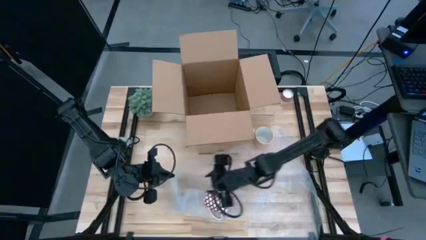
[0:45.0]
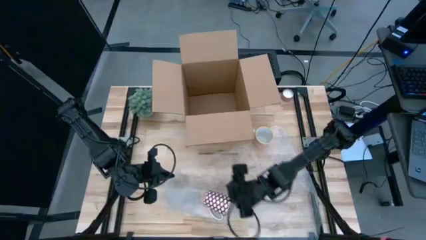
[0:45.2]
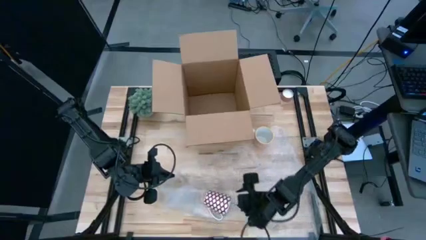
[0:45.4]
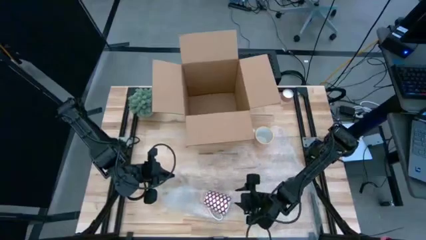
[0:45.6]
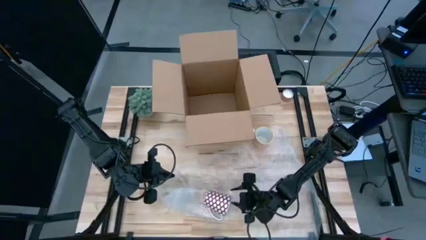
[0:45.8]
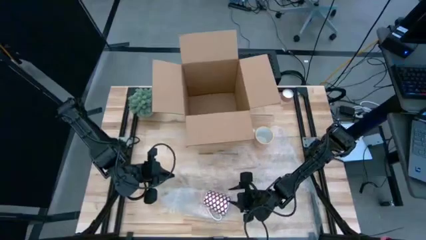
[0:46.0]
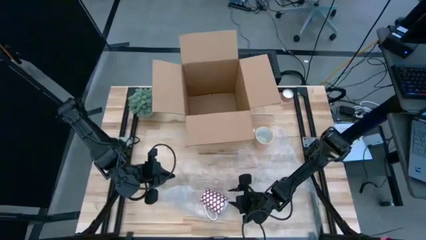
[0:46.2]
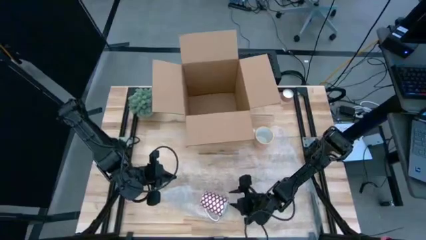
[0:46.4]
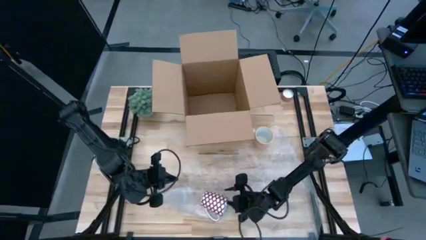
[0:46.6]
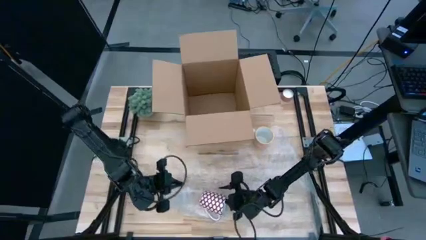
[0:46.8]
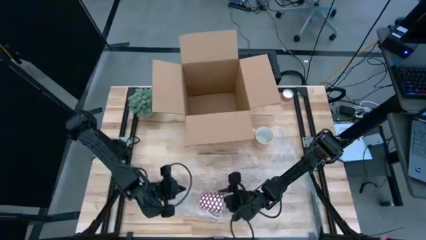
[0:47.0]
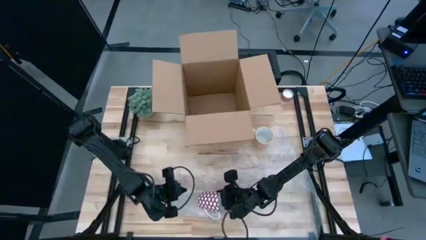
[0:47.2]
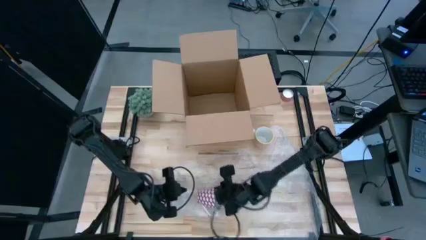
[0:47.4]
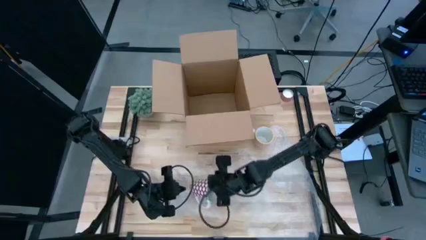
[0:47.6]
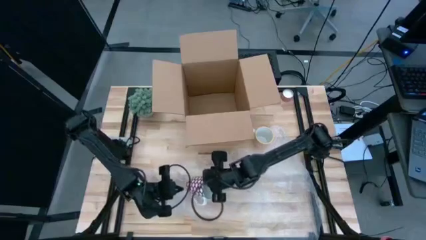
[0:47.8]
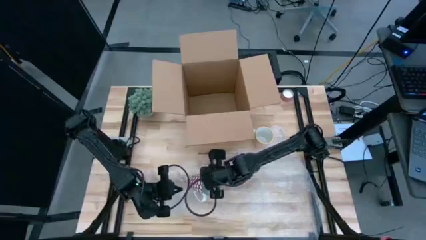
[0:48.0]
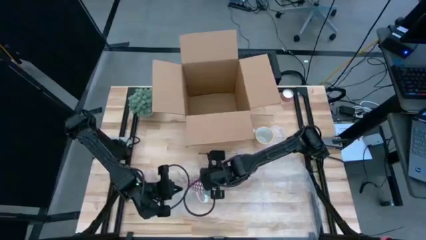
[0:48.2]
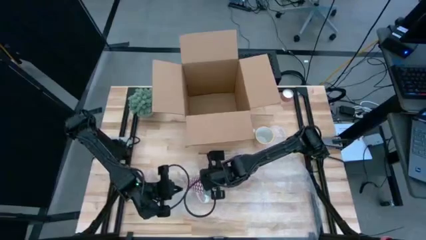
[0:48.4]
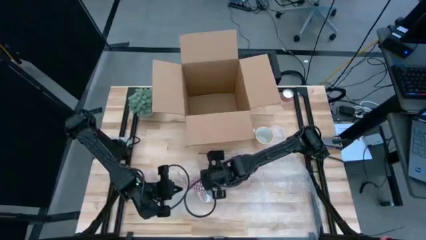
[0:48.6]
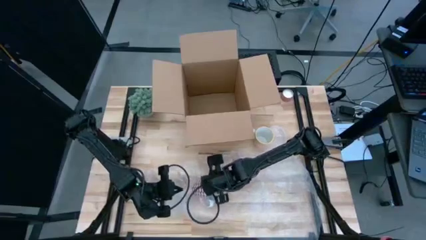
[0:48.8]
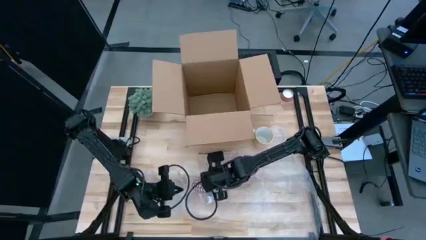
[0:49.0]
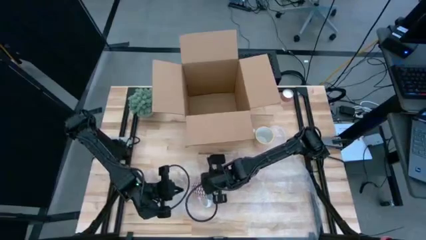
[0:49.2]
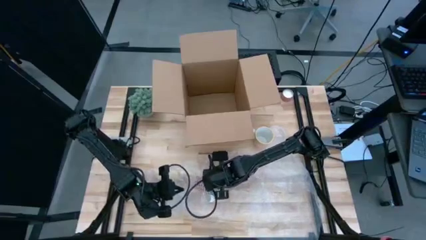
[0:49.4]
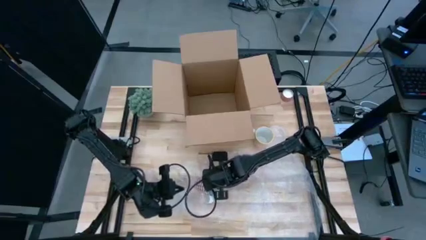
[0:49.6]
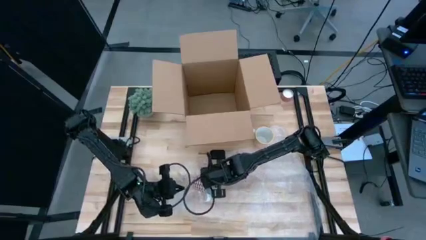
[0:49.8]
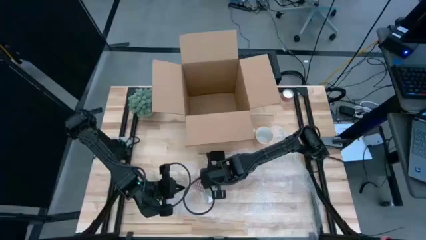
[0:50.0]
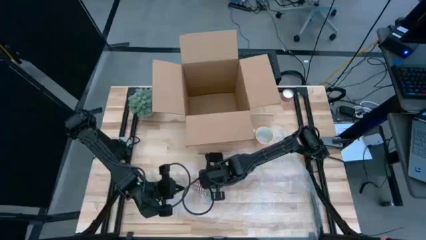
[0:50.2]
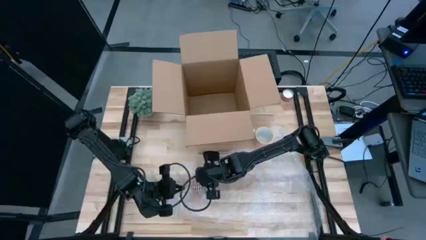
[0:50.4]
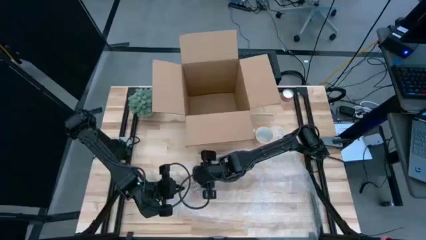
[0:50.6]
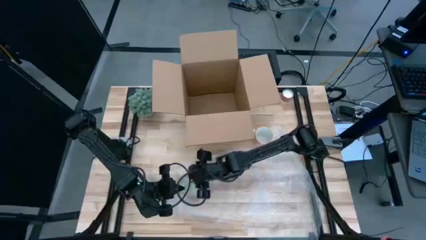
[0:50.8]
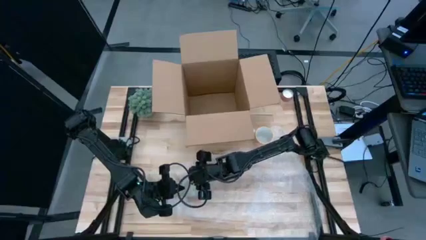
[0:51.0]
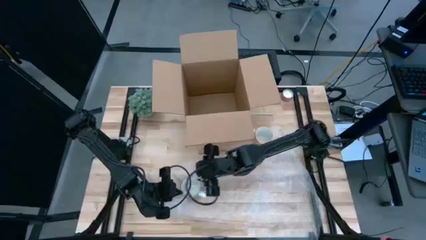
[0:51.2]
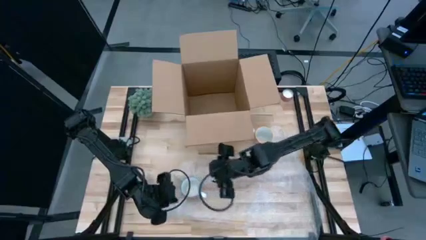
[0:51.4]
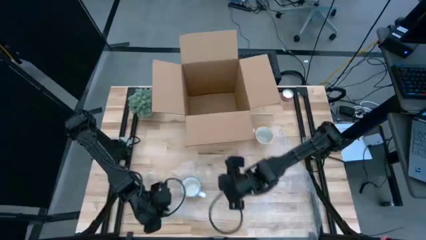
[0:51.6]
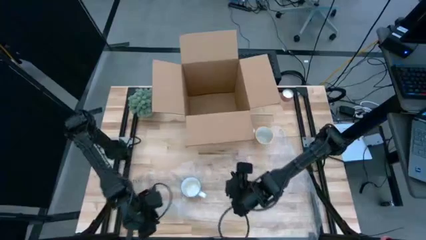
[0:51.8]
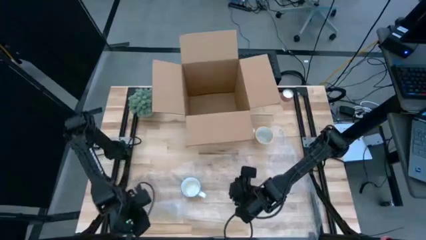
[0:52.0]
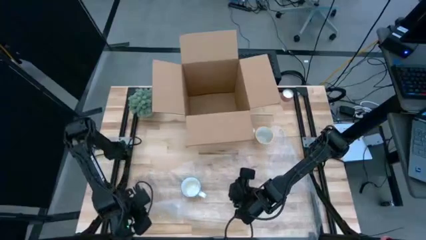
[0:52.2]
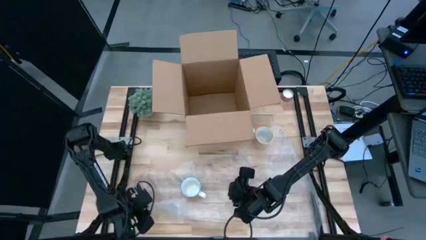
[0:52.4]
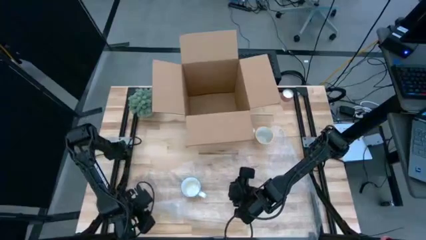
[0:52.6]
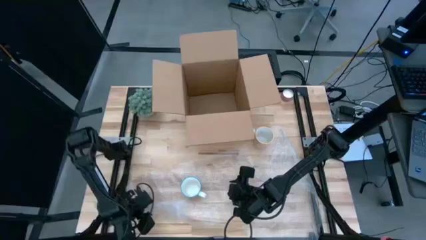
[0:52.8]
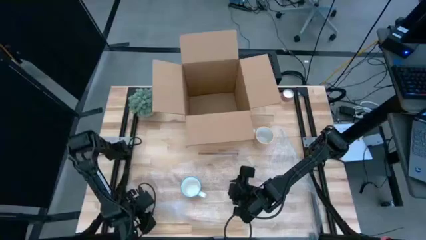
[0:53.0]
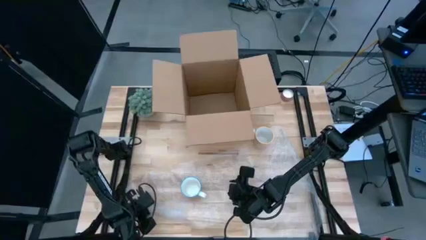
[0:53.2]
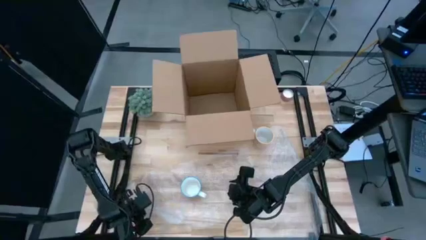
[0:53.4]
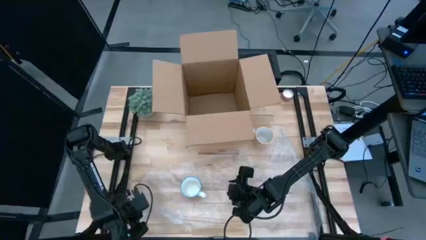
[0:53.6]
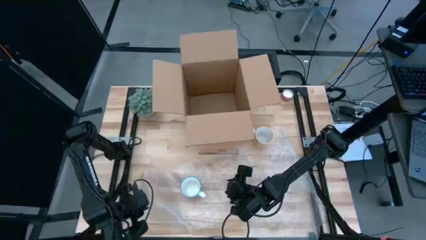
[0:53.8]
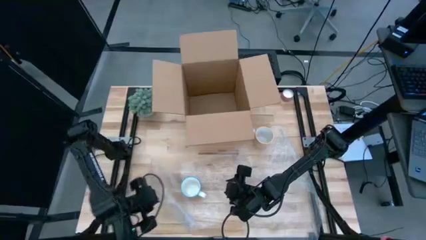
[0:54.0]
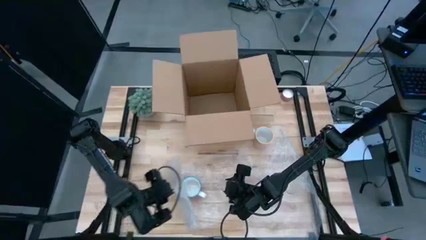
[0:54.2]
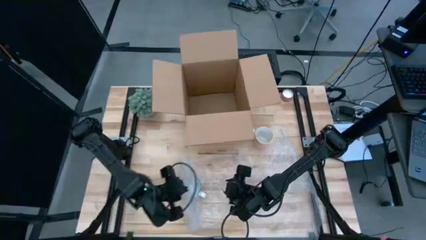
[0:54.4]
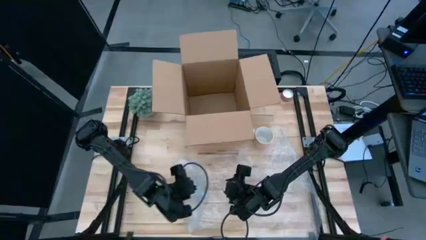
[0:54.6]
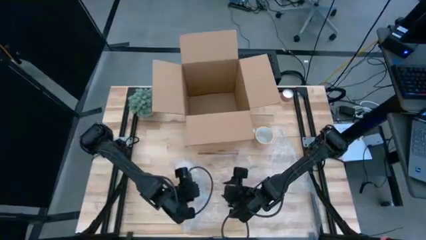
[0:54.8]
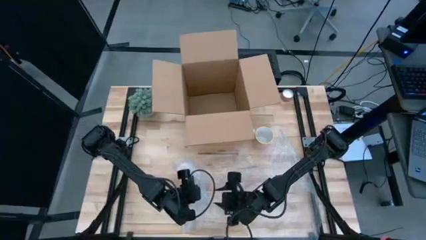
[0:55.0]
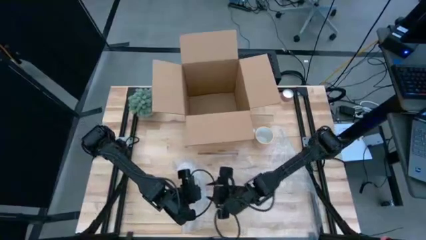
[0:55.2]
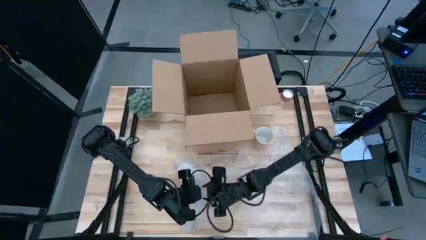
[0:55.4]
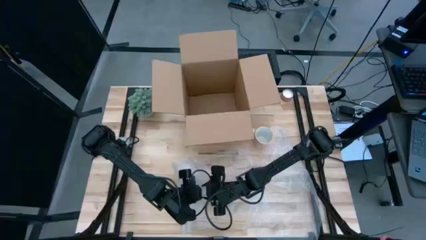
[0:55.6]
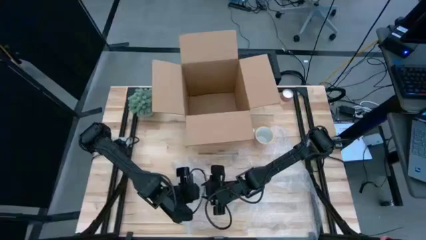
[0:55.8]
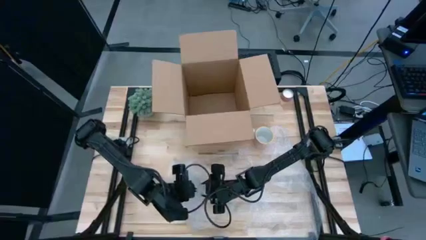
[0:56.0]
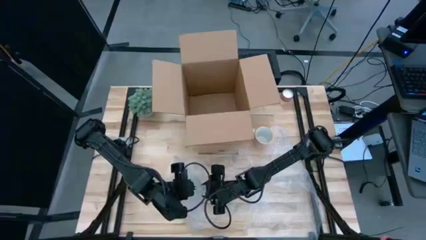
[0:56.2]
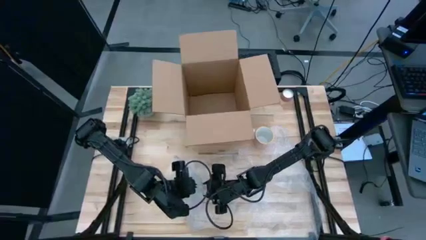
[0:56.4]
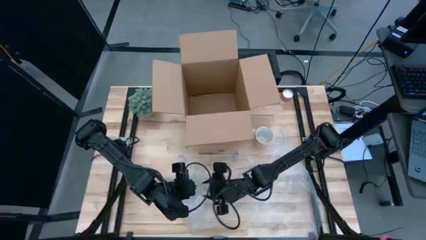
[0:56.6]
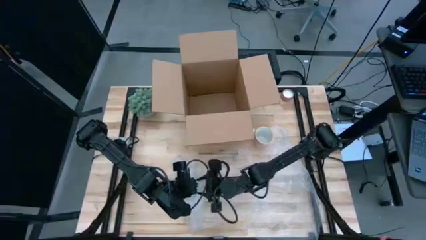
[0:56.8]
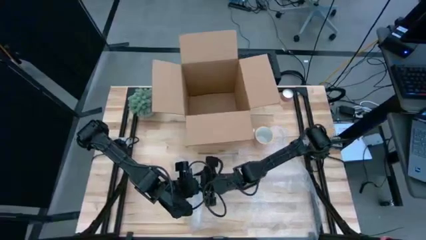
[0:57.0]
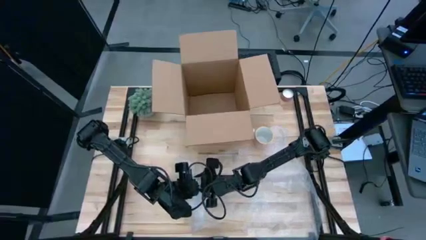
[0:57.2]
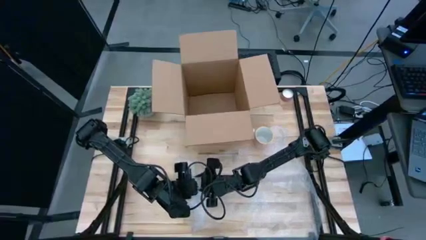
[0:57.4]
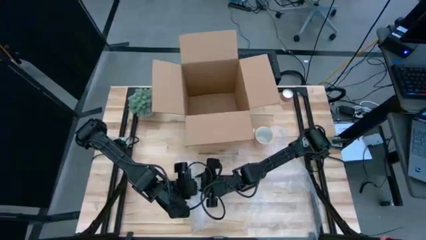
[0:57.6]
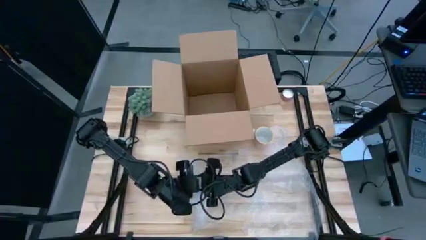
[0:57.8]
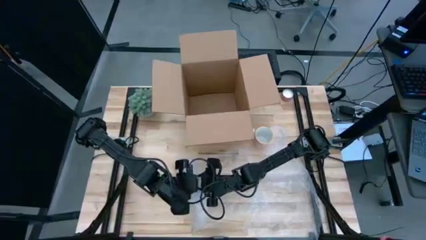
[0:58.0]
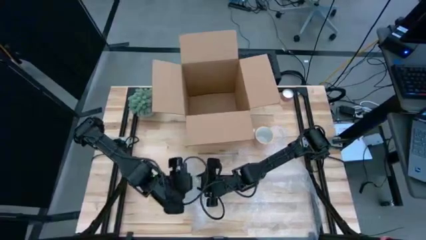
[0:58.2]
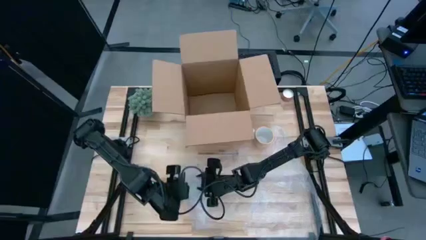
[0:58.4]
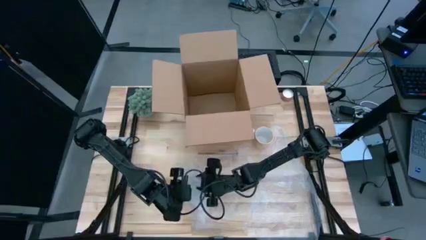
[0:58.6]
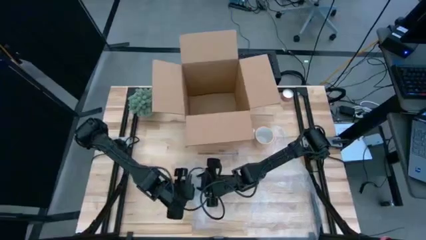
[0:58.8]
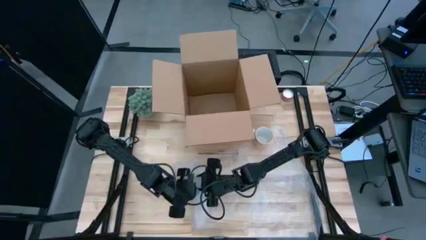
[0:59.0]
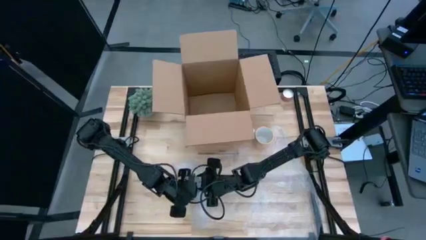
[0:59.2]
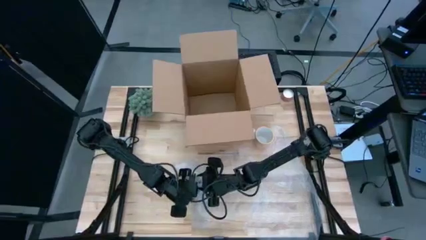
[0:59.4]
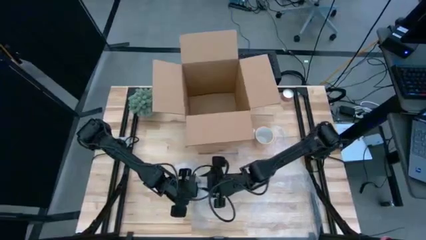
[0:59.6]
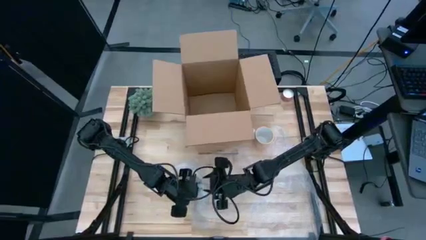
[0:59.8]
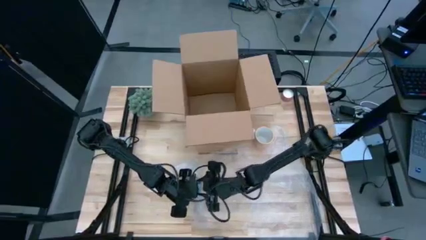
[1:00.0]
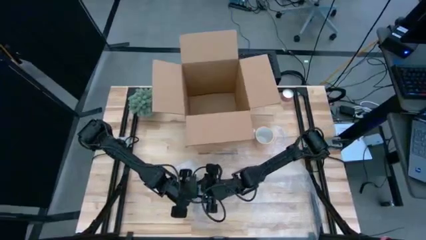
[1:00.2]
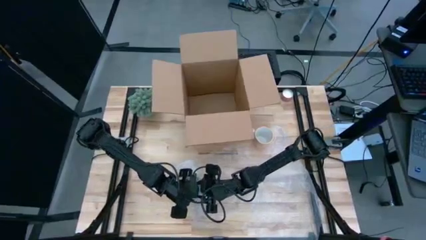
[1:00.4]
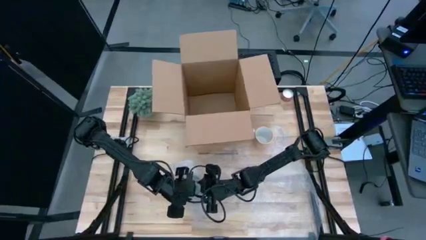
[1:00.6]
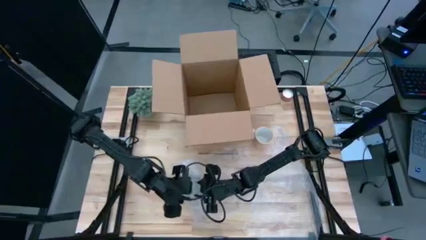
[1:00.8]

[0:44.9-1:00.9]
Task: wrap mug
Wrap the red cup in the bubble wrap
